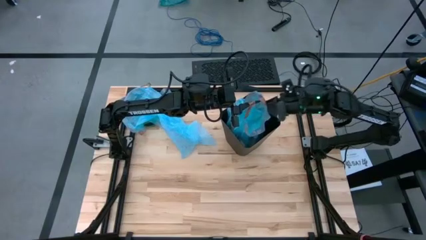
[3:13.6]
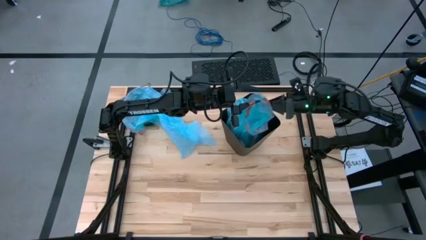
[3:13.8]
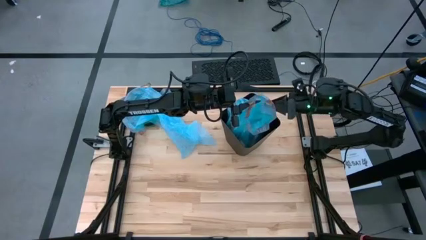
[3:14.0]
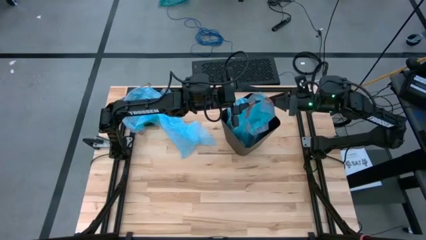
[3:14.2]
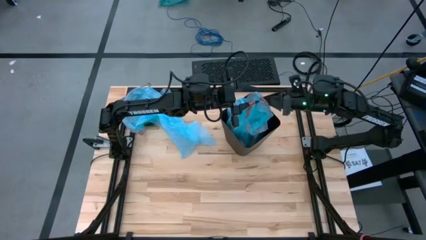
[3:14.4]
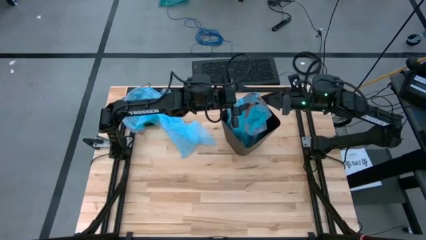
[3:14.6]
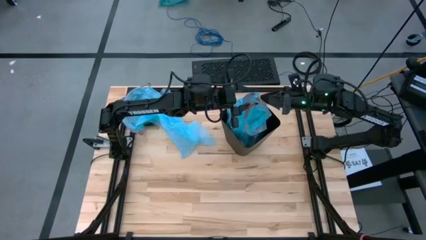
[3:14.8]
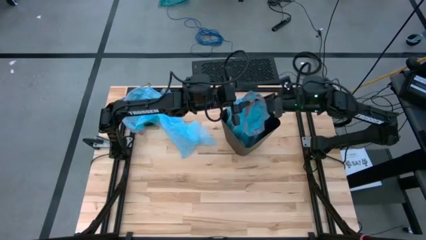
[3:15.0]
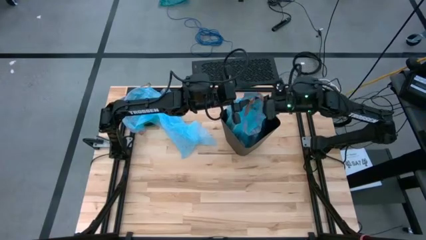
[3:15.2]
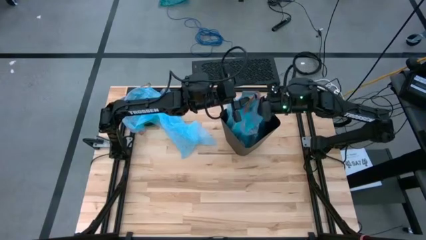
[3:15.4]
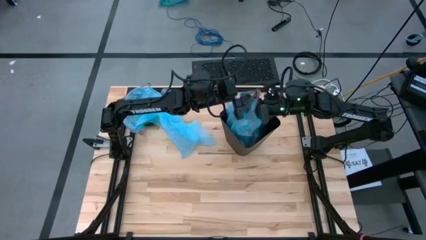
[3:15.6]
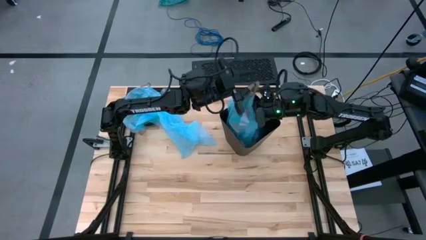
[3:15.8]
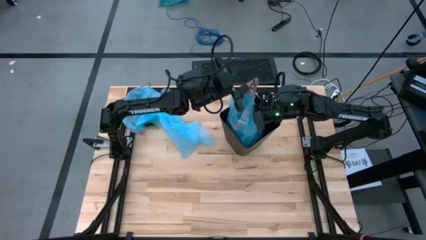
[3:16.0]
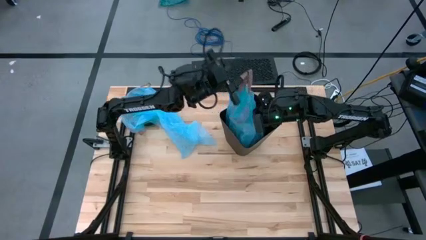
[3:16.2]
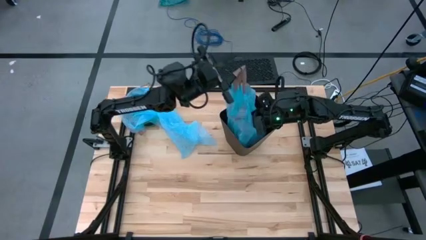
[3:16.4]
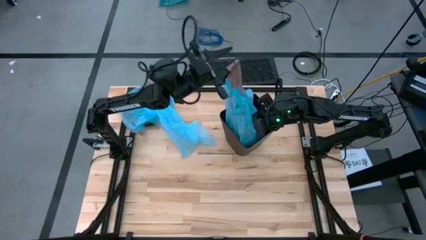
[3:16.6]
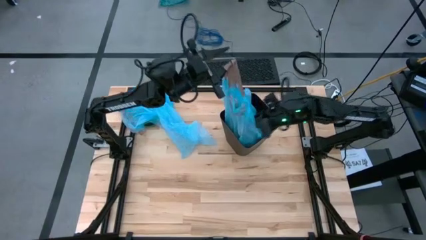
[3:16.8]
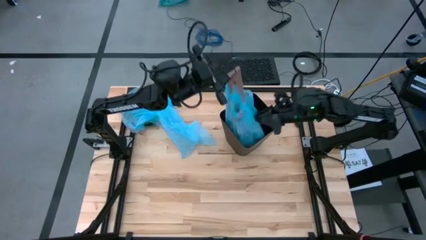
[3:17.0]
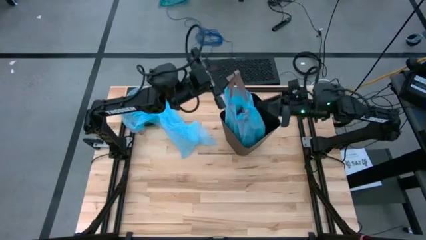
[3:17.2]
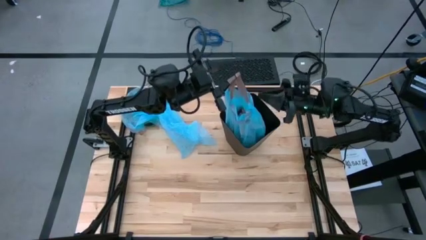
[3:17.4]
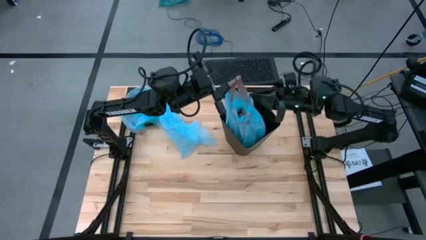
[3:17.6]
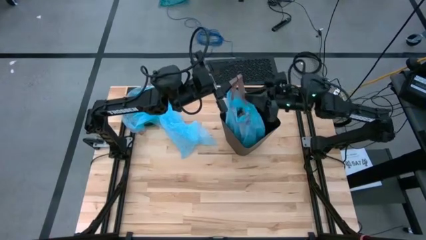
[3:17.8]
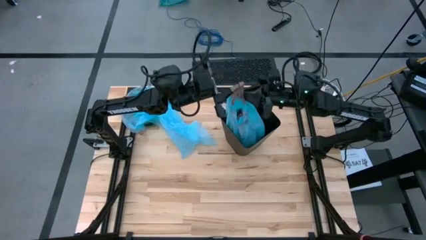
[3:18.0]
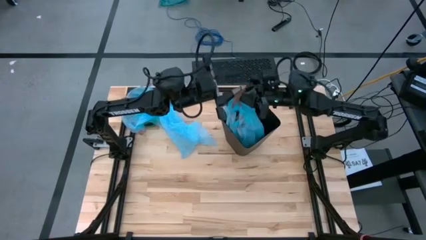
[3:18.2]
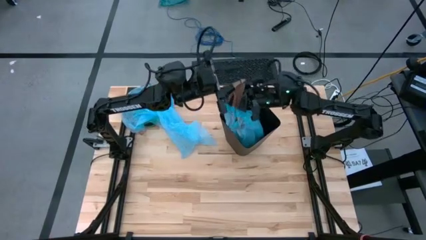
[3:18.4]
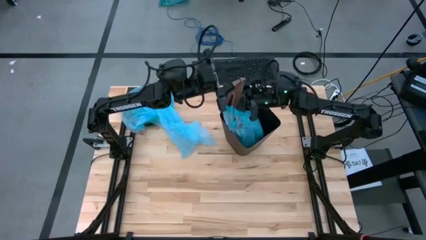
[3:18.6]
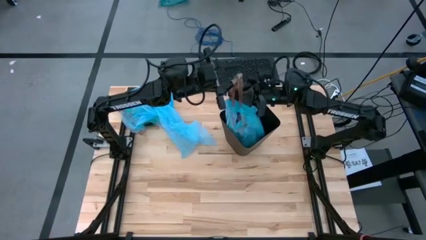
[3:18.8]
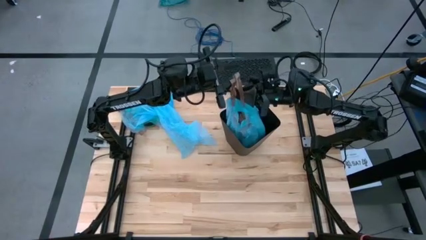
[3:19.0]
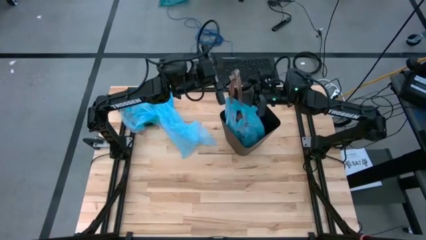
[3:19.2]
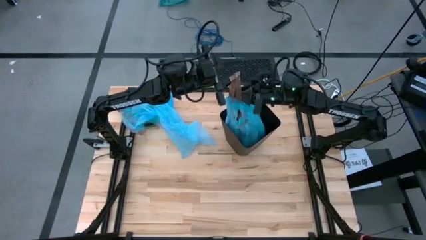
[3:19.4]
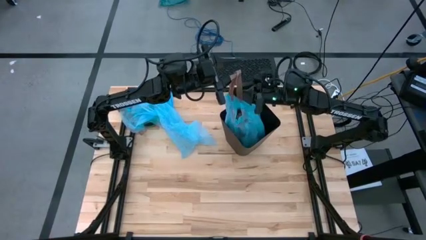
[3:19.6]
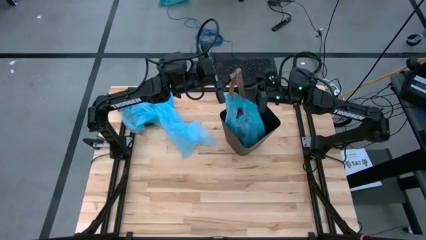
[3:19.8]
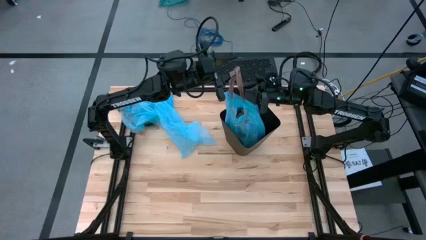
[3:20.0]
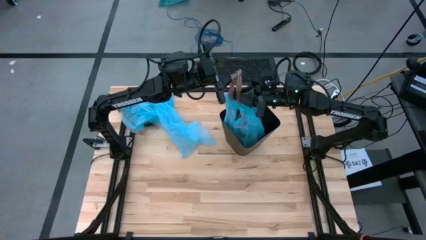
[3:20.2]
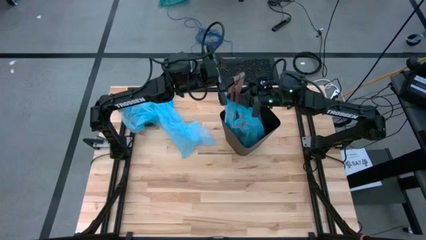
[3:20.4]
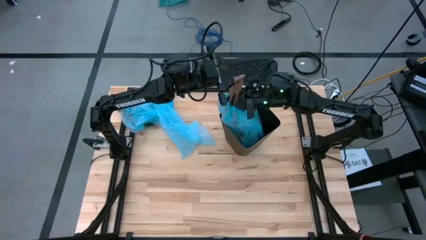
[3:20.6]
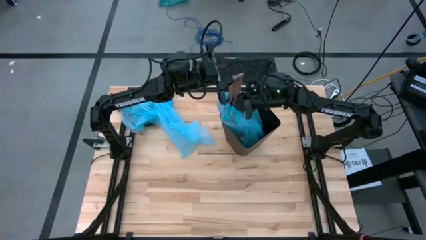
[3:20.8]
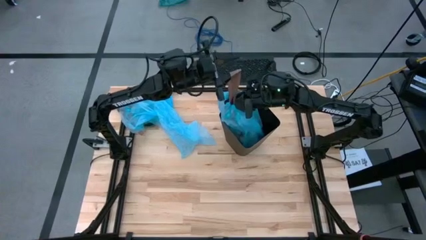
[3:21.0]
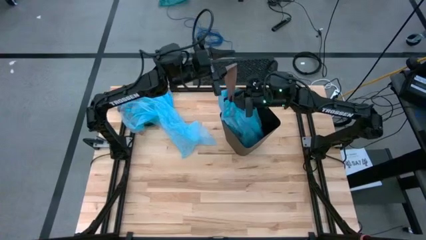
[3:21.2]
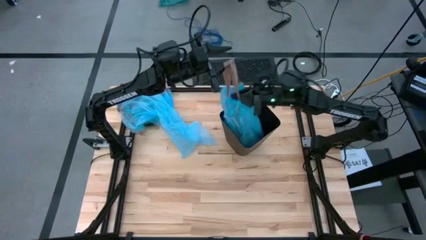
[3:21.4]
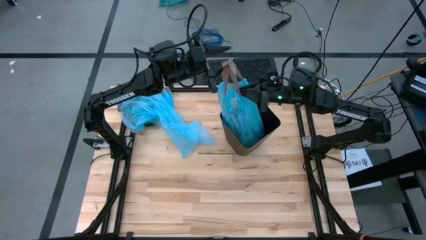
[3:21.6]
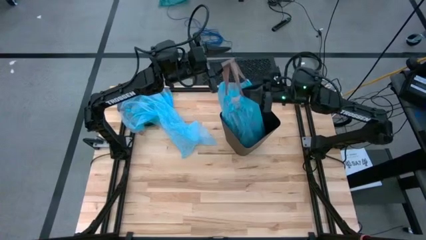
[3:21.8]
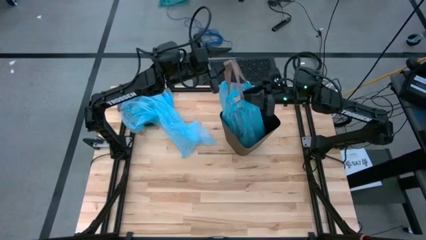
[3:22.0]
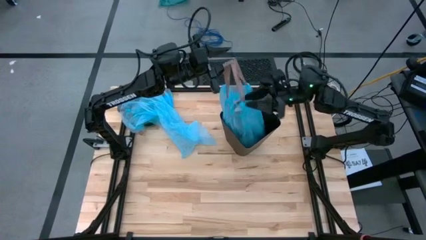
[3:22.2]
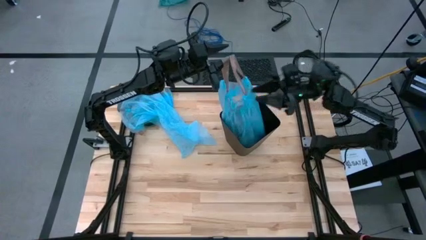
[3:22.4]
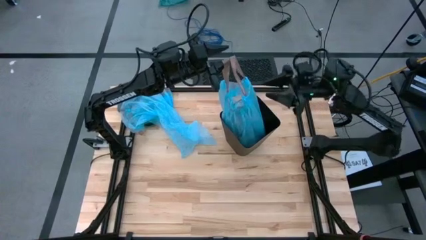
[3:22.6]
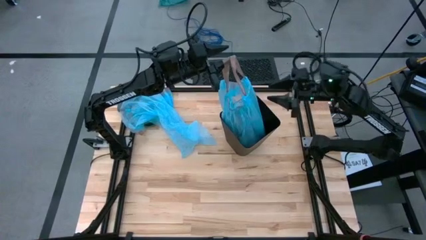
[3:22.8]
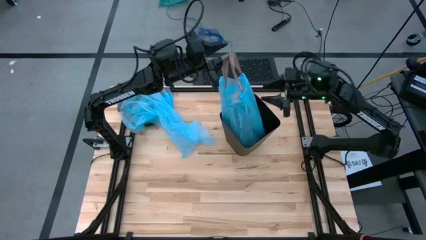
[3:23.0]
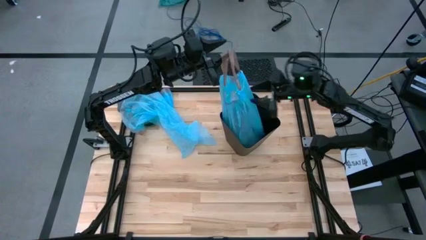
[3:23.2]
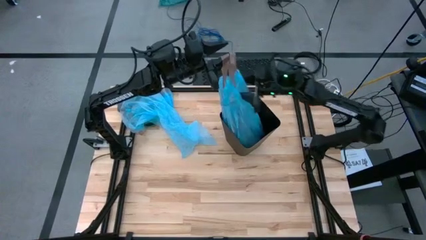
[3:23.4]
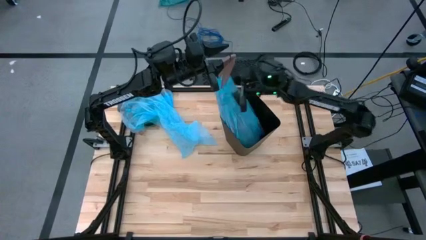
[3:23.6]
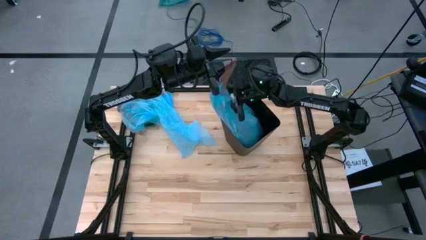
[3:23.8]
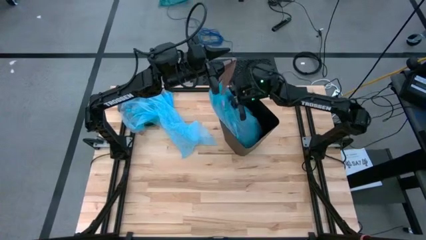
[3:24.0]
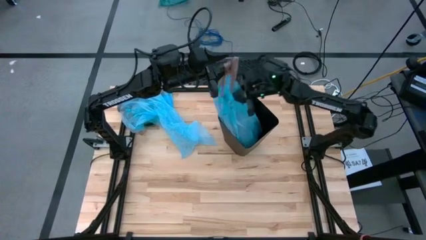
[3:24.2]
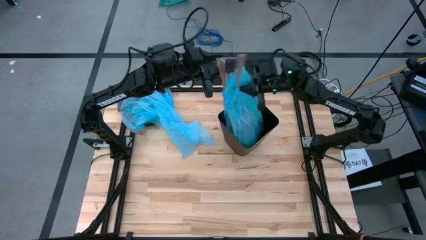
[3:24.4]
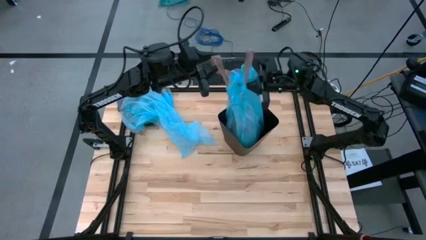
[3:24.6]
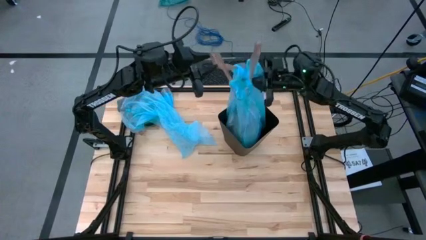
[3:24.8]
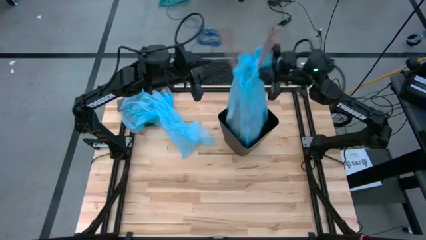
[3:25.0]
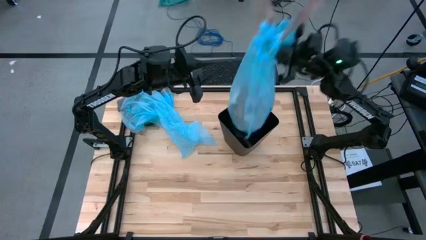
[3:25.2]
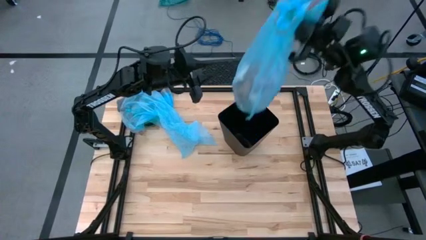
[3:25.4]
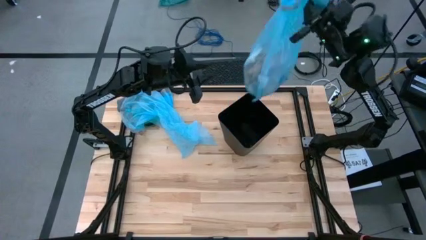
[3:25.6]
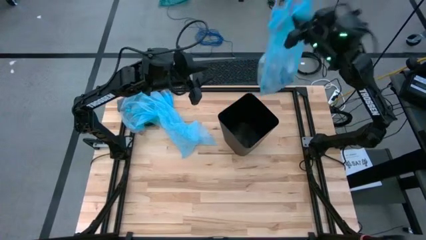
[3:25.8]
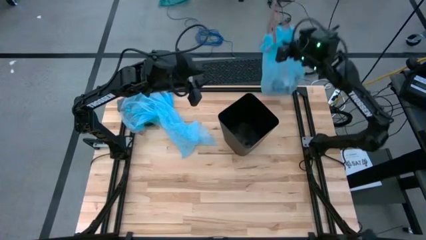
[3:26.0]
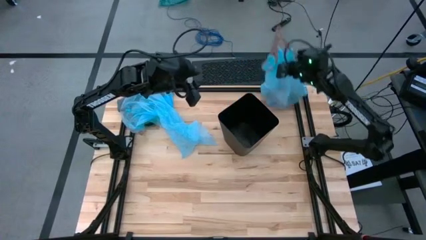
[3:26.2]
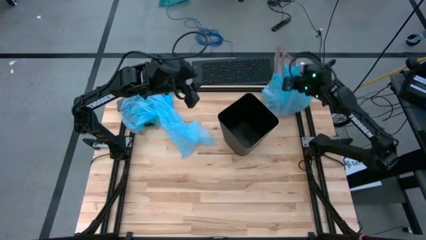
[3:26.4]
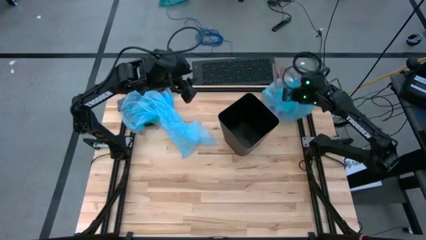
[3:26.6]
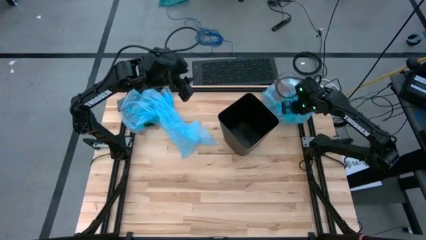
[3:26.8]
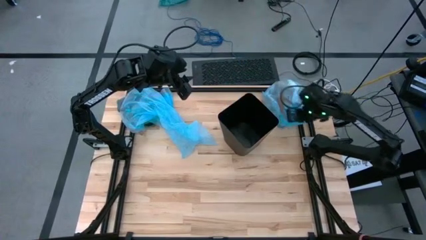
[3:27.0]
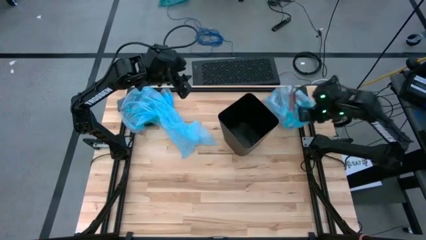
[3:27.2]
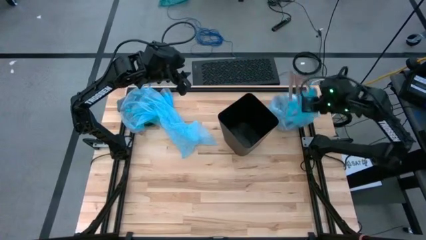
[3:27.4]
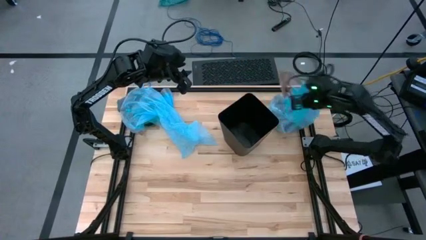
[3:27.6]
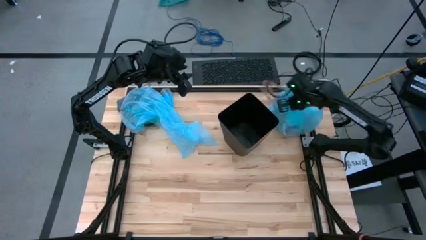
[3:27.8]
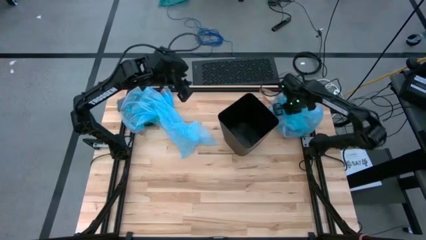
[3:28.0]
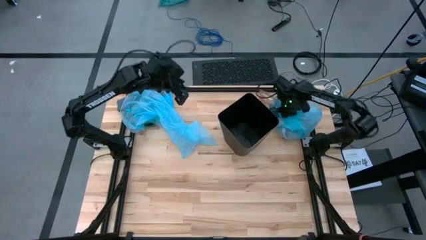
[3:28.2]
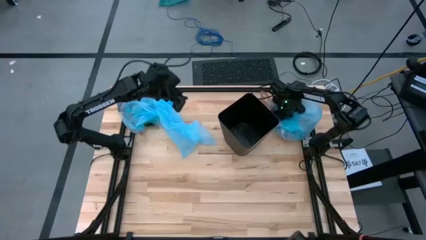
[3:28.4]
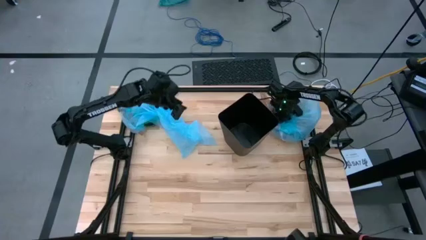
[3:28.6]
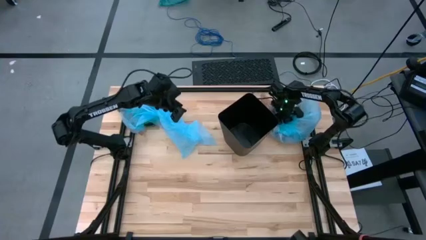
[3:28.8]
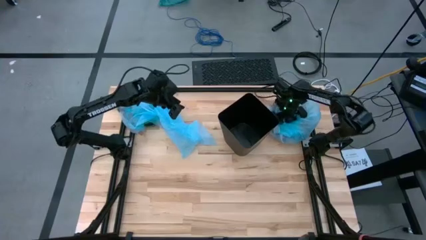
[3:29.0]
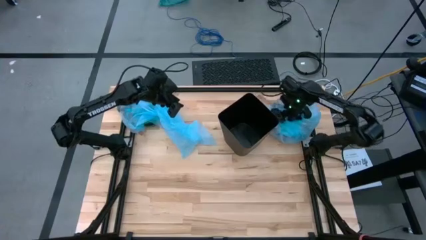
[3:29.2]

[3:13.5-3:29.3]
Task: place trash/remove bag and relplace
Remove the blue trash bag from the trash bin
